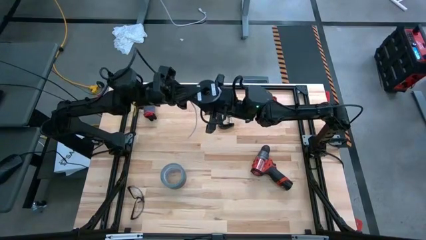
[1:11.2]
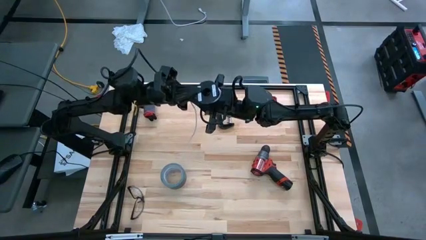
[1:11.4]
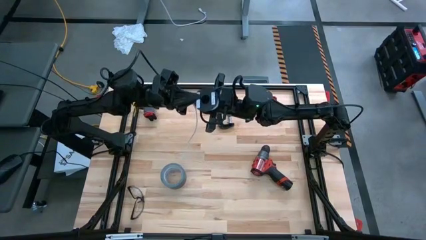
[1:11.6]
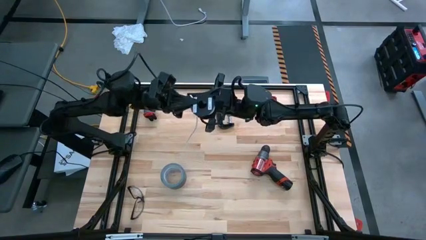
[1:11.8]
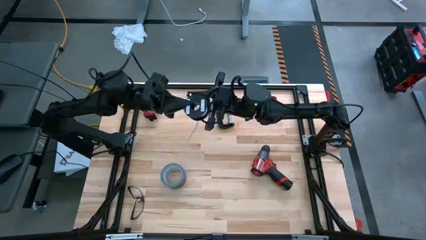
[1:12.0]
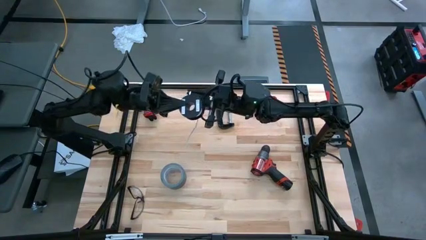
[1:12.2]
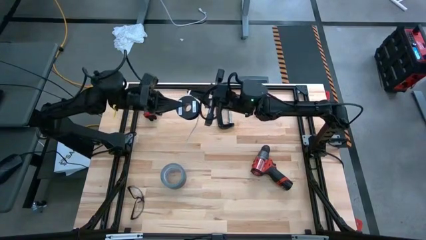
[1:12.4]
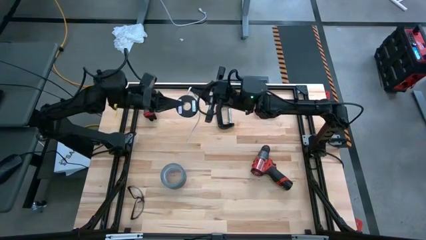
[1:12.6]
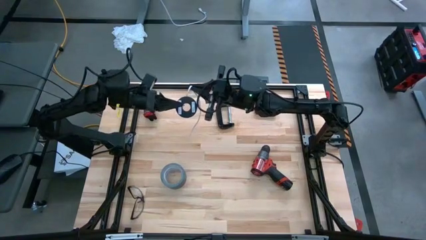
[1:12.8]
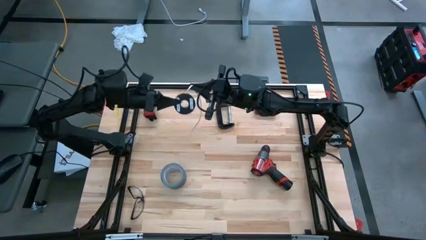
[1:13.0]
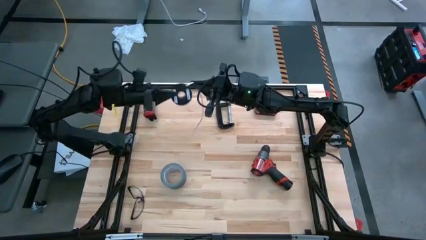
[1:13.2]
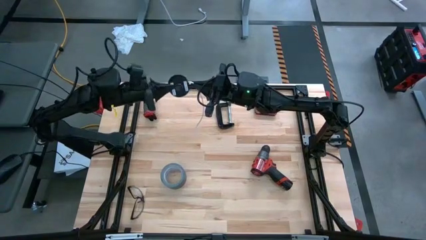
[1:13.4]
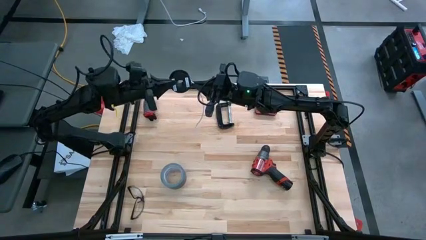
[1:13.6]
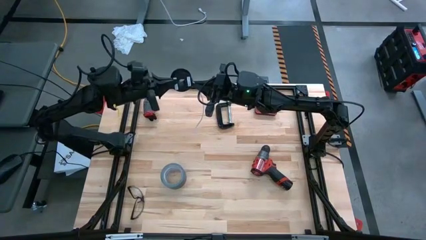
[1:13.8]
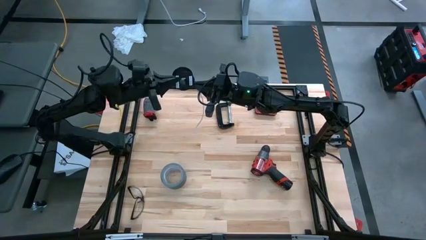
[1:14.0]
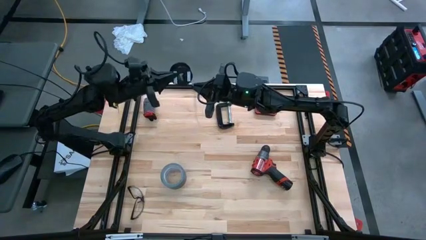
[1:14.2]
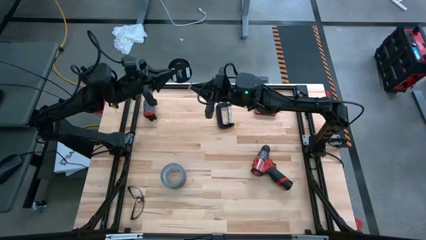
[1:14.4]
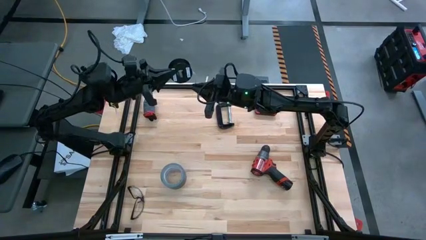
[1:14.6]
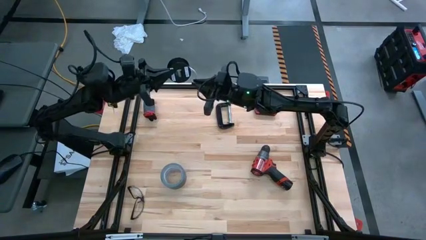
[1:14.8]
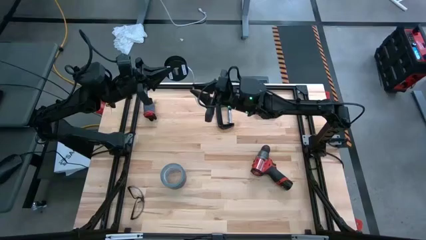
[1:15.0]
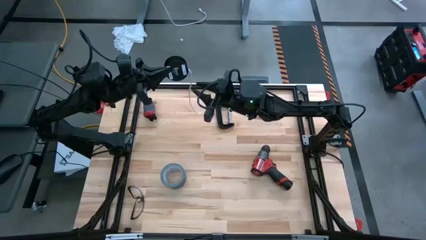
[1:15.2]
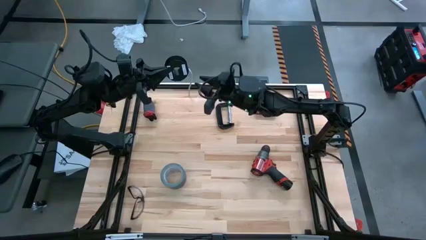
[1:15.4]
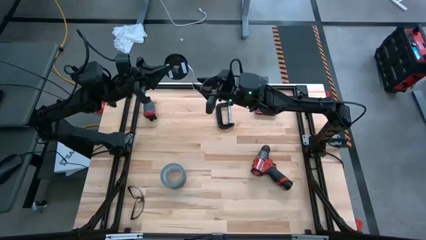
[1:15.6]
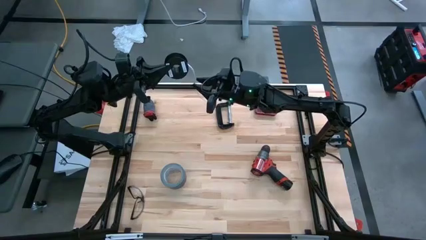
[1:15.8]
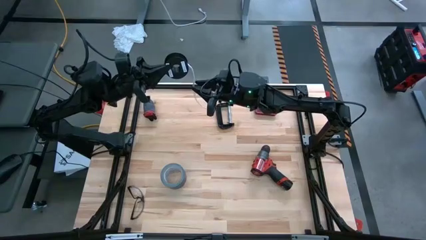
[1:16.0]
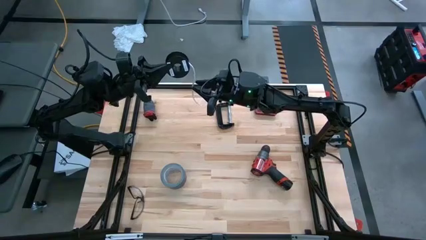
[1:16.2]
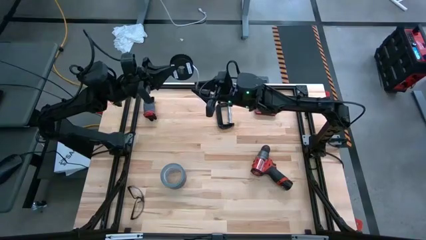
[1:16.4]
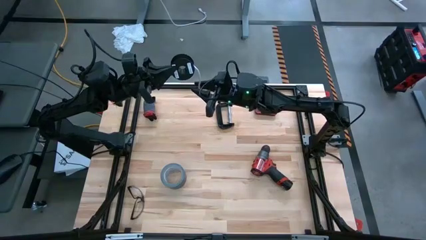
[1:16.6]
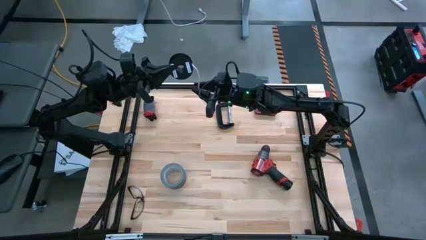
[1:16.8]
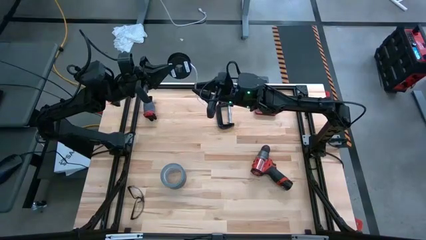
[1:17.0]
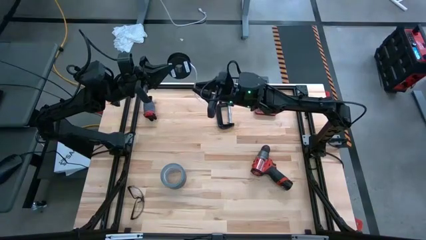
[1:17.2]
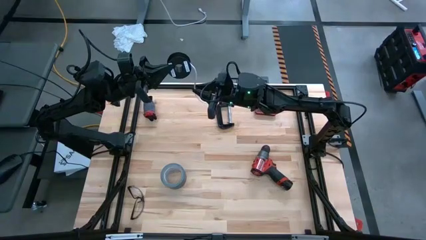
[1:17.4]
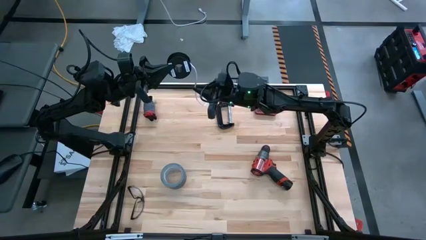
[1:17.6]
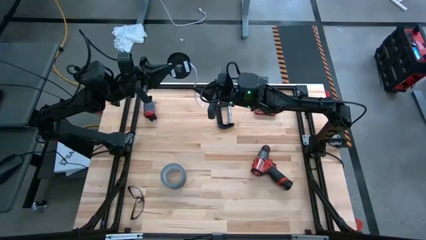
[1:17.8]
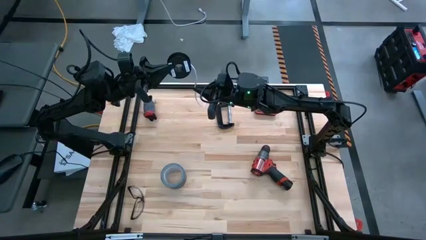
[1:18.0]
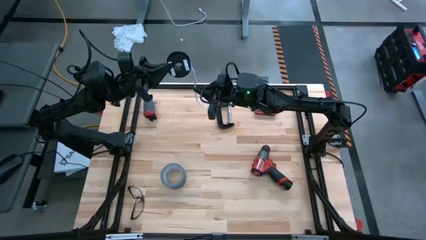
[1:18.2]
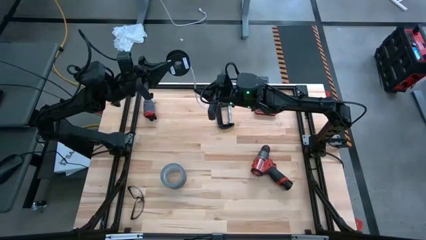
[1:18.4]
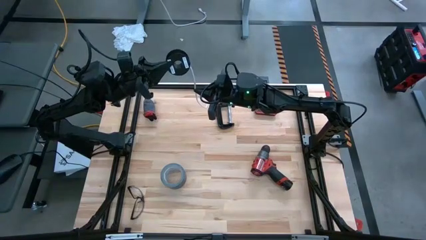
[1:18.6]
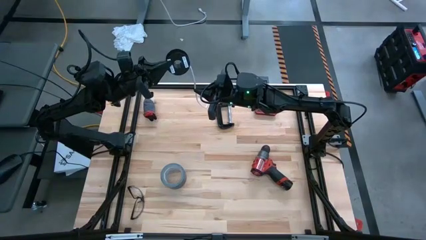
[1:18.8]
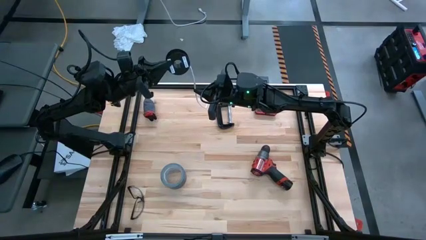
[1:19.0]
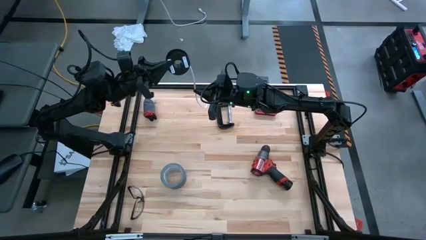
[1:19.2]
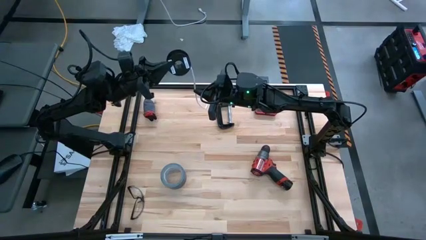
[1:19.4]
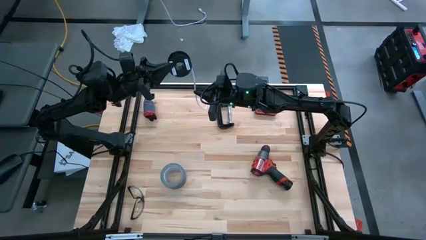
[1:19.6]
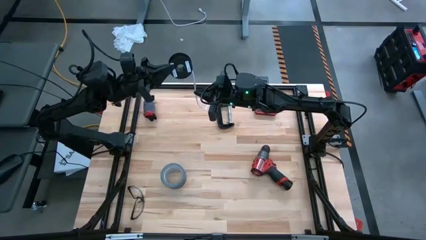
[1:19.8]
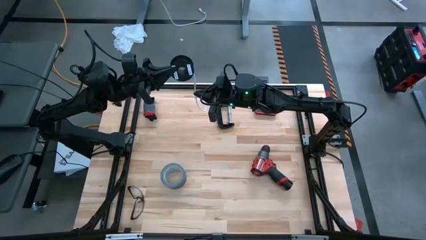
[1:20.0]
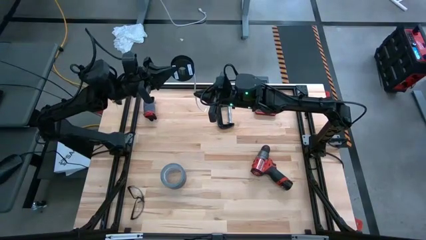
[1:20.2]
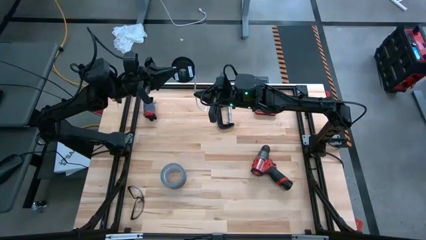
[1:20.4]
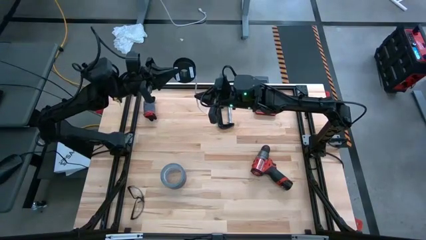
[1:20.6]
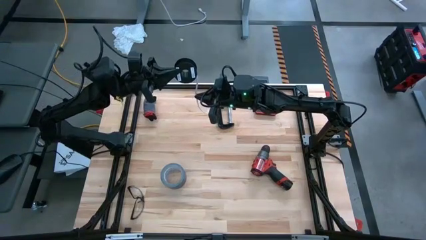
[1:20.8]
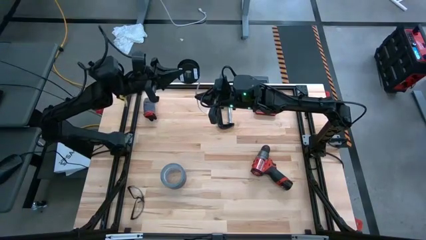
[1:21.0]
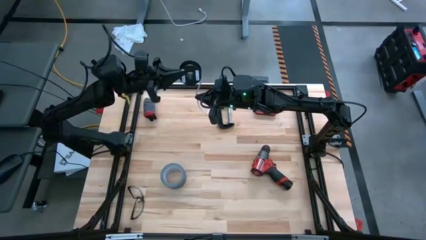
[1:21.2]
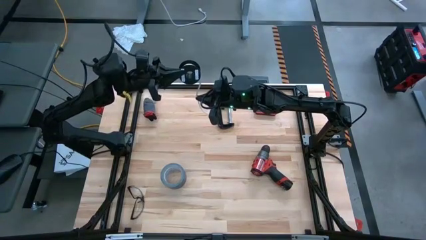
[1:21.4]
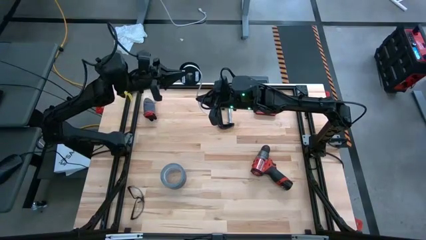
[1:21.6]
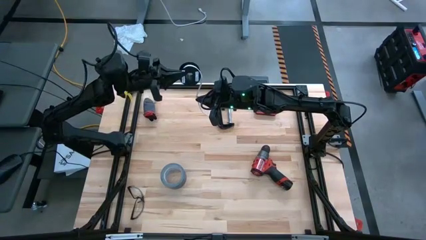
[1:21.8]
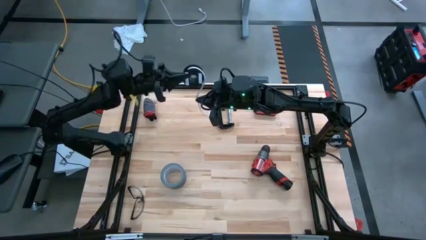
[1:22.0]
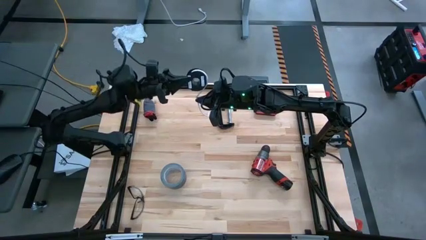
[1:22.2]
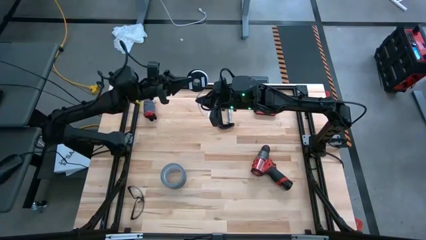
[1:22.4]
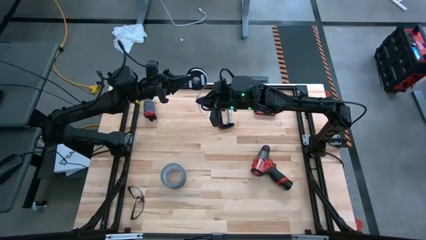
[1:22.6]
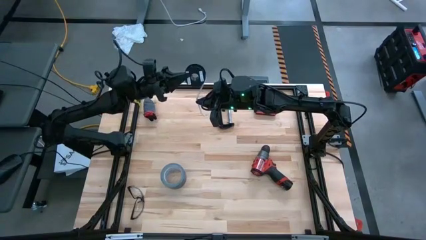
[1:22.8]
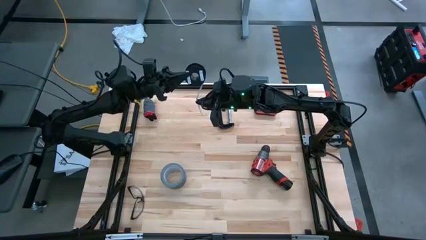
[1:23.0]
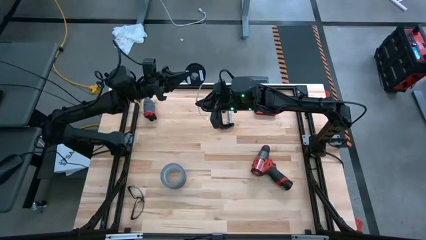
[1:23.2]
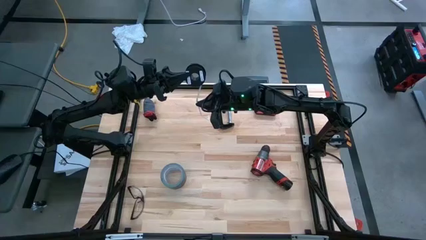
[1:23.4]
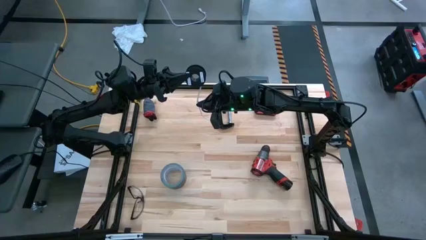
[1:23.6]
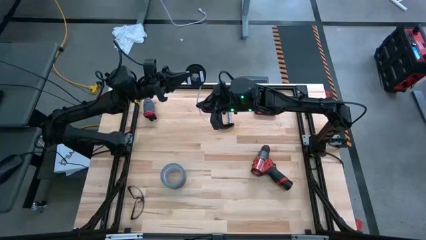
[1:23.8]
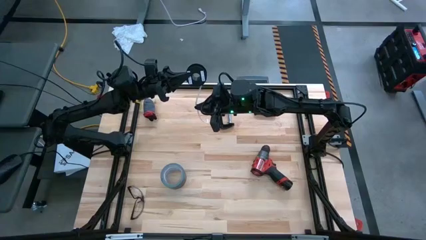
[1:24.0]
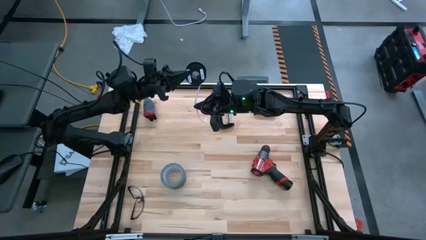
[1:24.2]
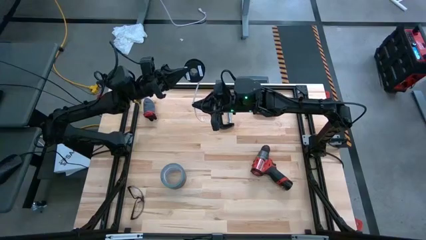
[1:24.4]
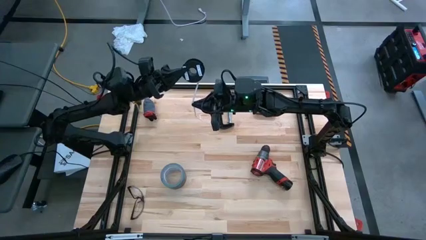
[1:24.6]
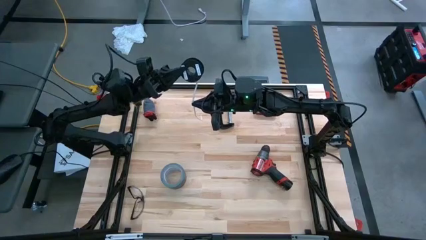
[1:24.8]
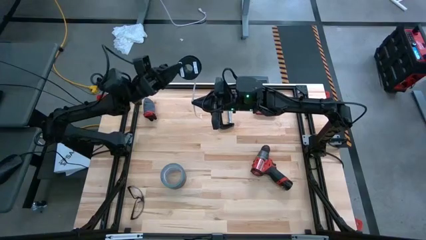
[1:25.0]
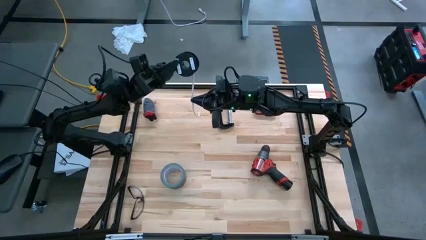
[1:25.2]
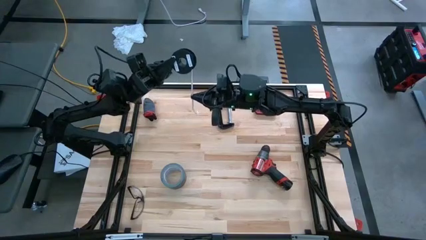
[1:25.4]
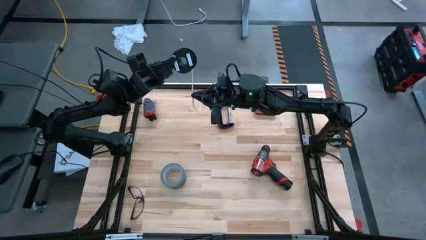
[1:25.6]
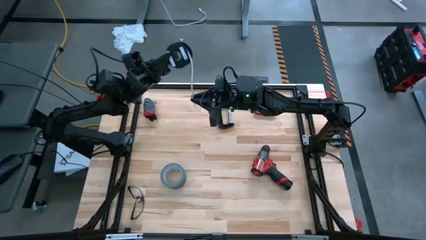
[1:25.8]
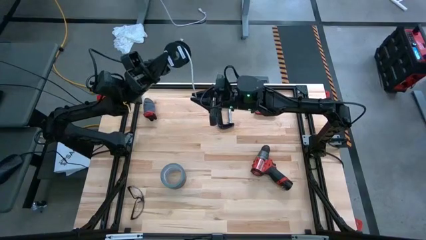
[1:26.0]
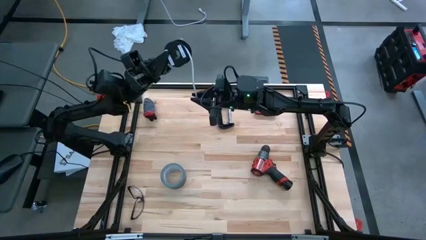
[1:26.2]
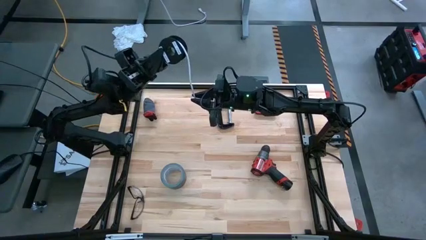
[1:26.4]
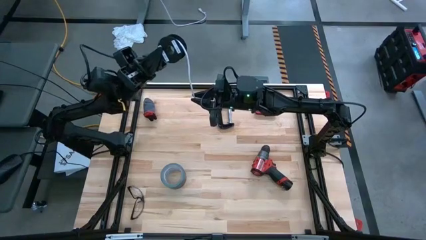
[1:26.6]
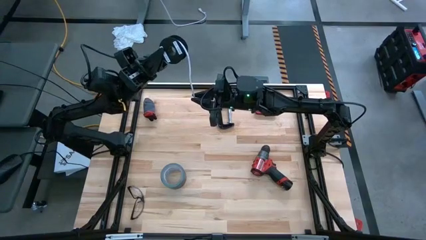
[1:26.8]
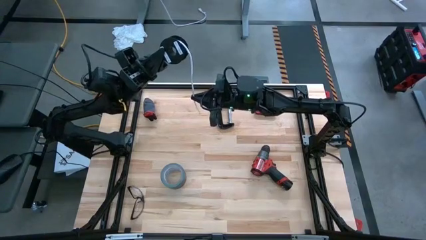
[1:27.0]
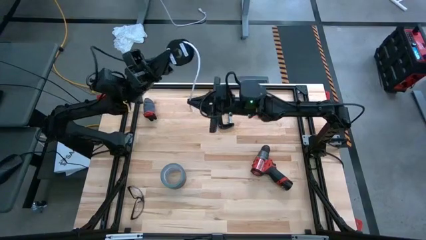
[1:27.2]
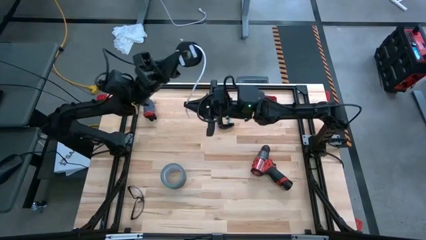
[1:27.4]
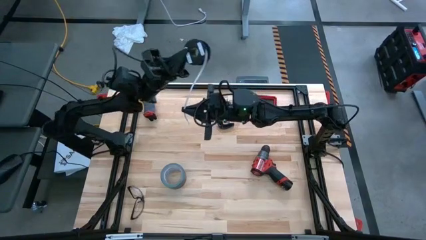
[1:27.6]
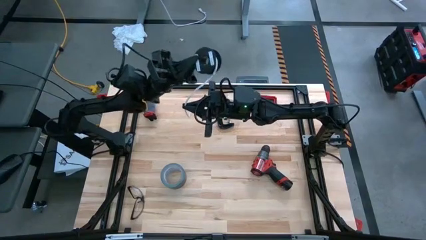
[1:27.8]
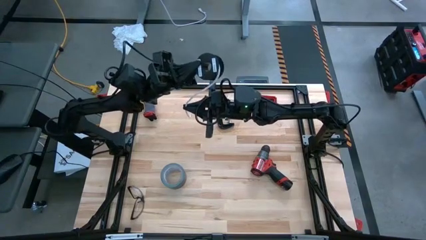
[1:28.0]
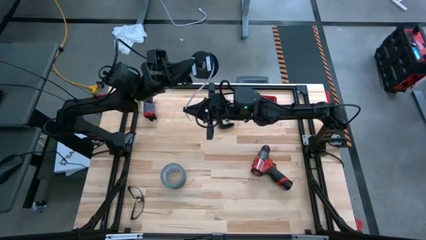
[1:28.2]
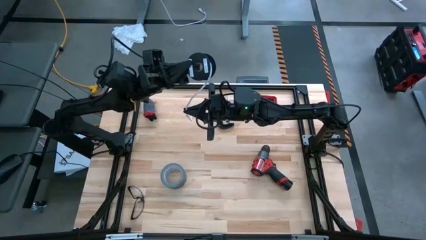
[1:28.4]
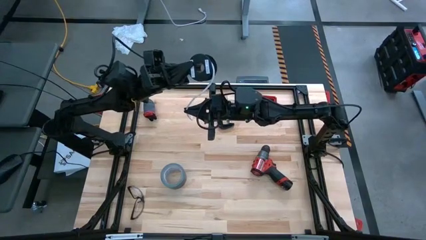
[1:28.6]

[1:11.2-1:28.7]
Task: Coil cords
Coil the white wire onto the black spool
